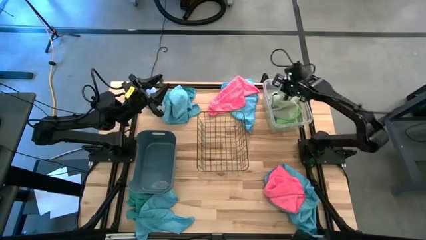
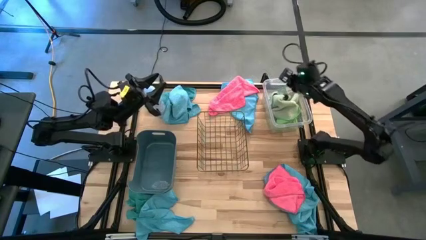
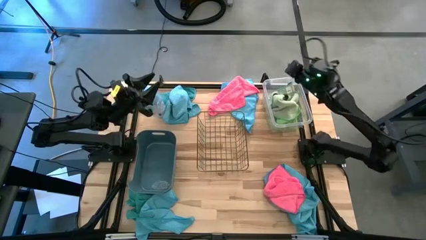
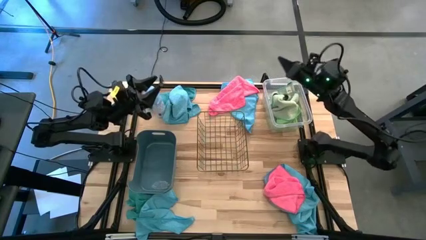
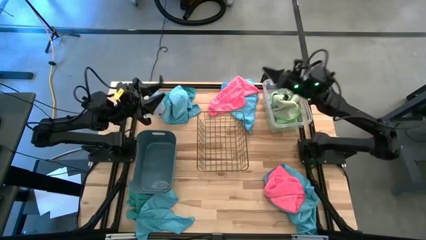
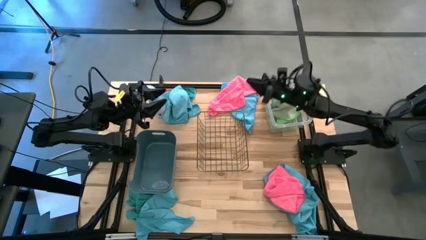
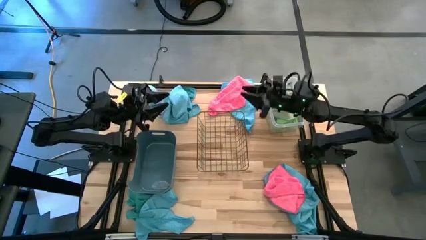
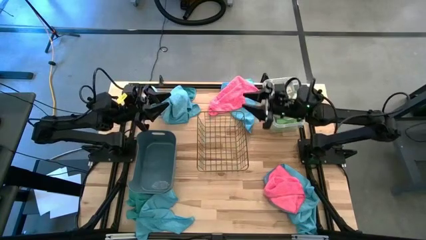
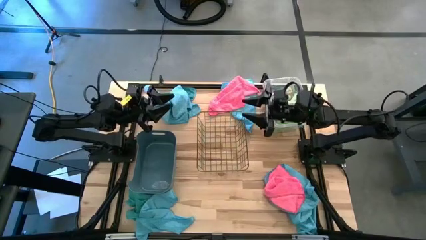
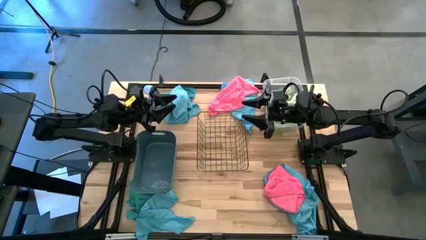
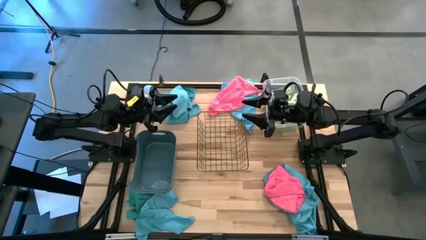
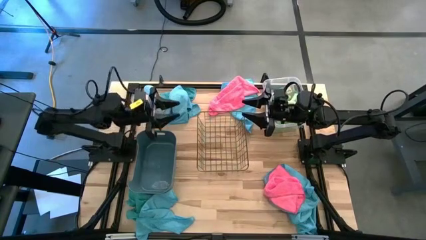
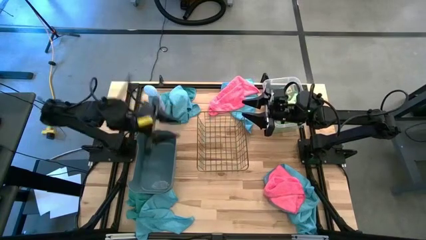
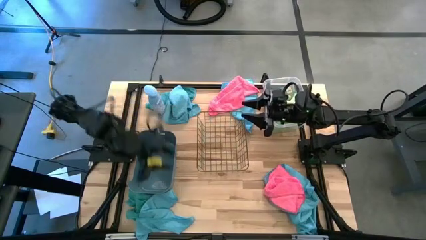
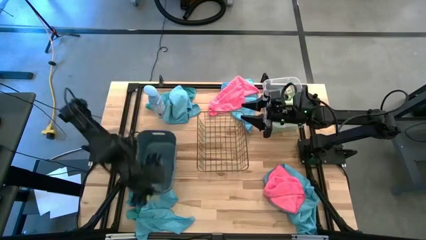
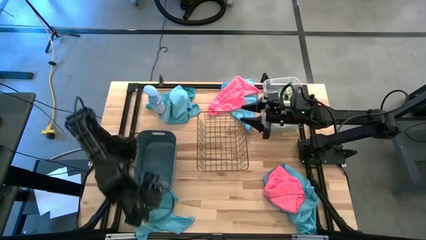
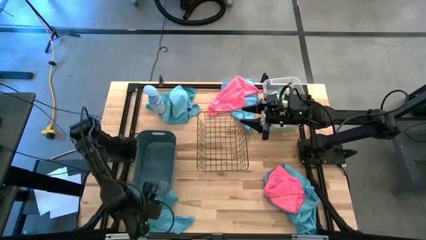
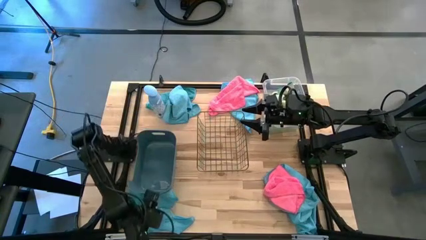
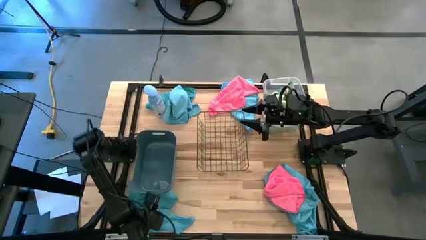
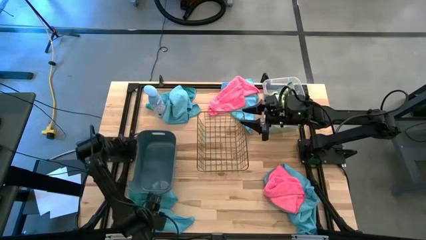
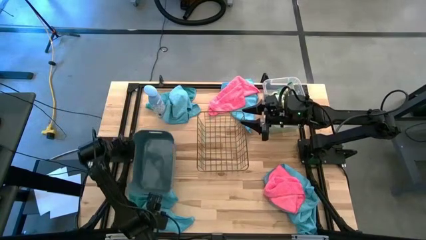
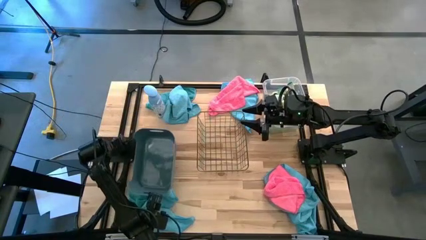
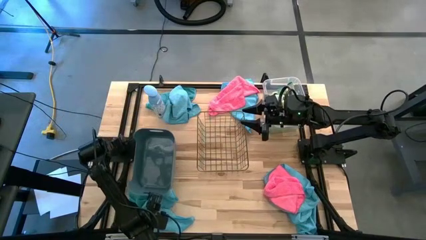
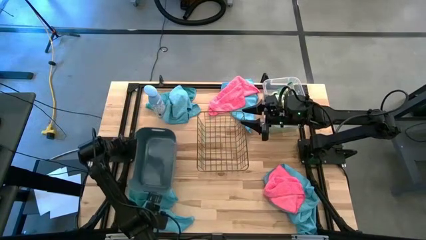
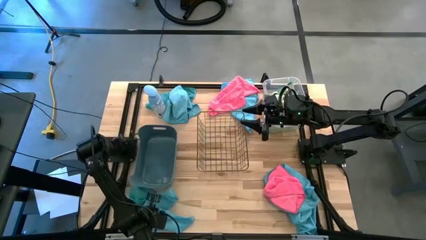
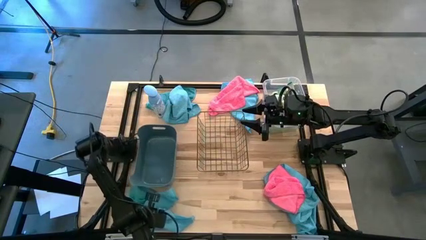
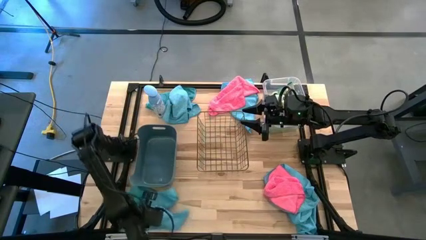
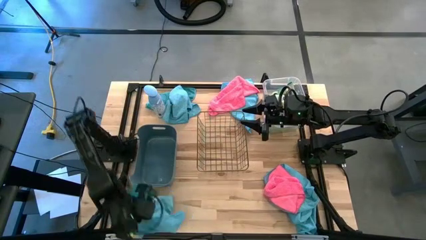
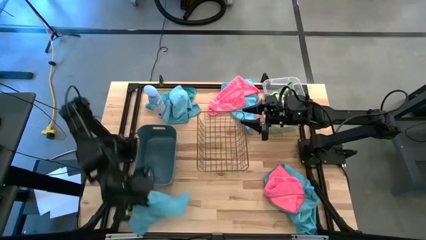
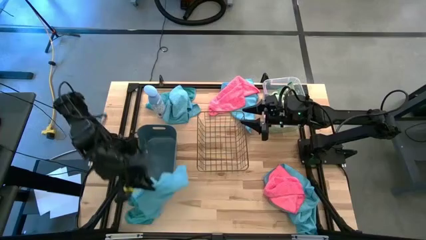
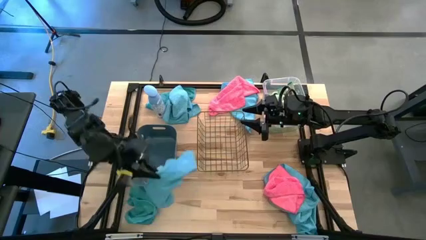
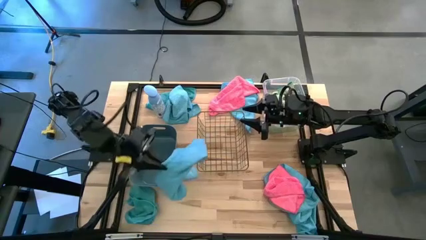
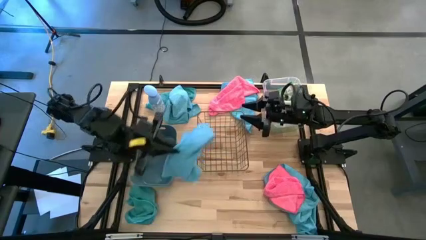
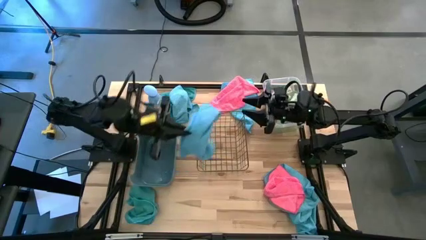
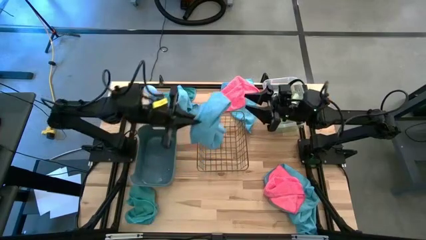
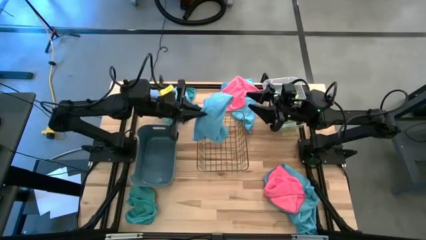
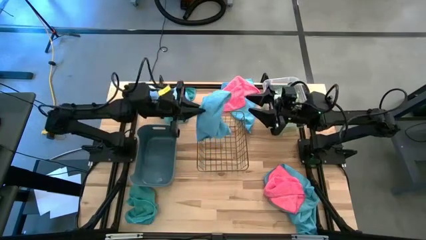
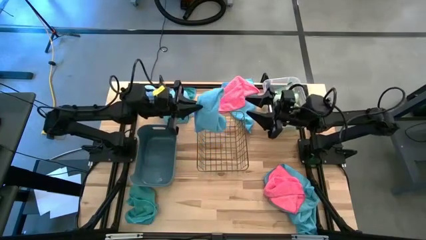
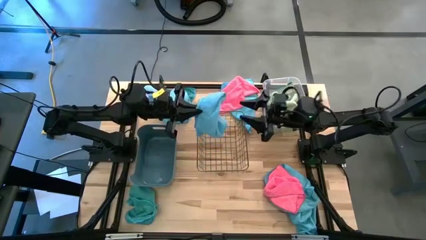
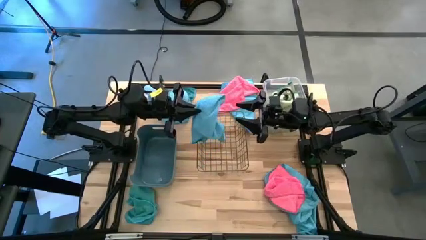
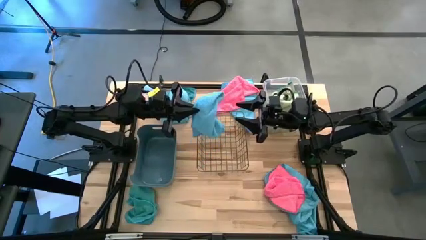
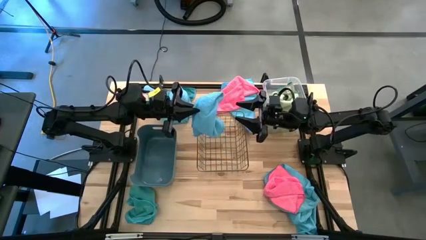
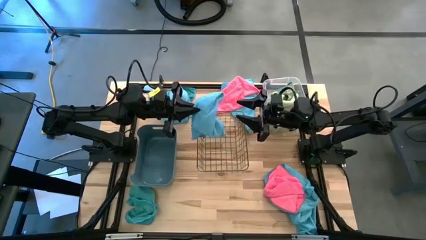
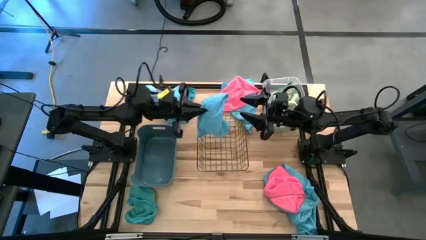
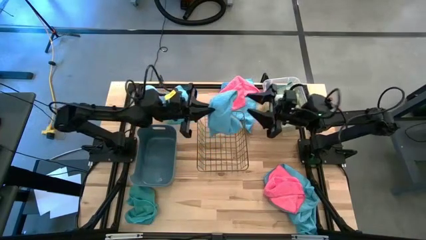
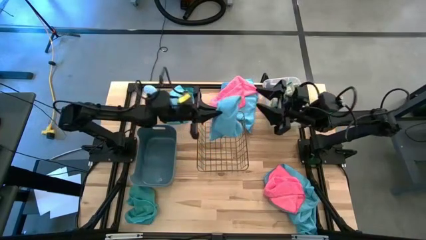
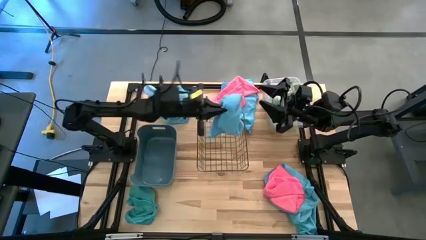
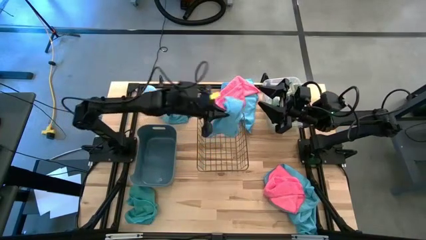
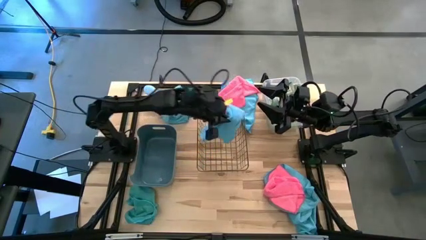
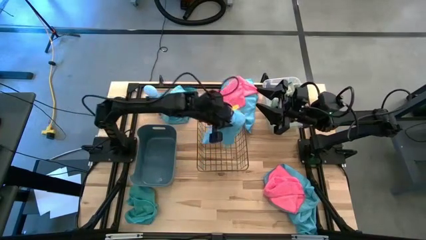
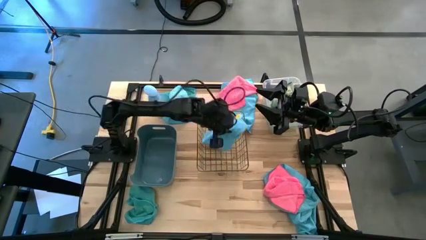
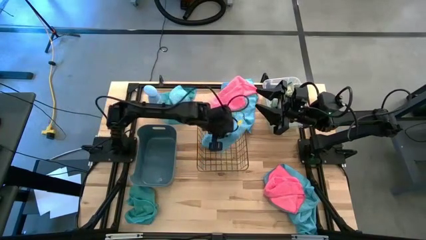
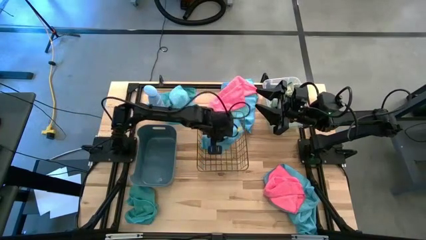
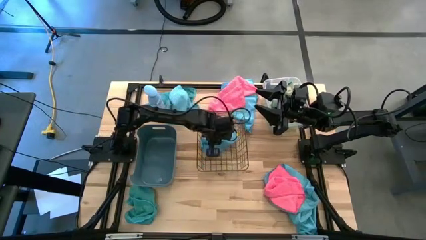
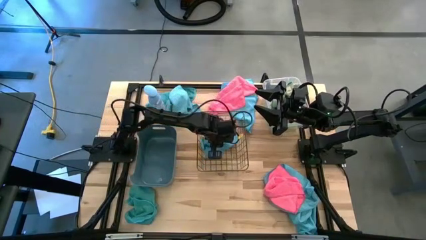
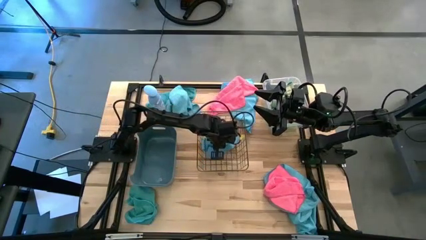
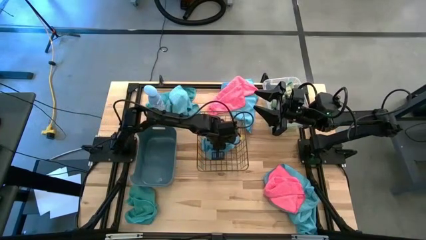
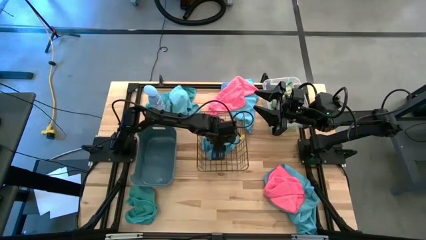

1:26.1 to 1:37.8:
Task: Sort microfiber towel by color & place in baskets
Put the blue towel into the wire basket
